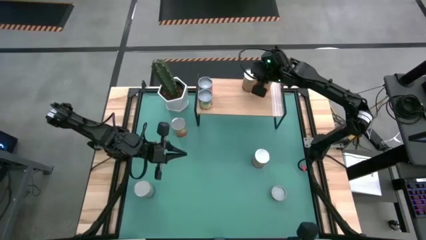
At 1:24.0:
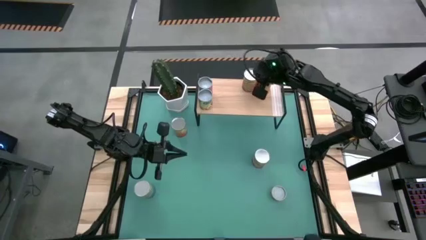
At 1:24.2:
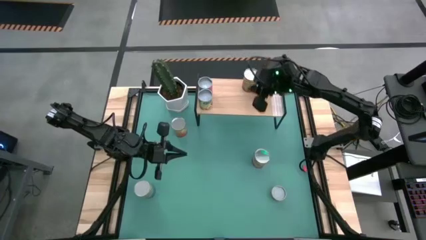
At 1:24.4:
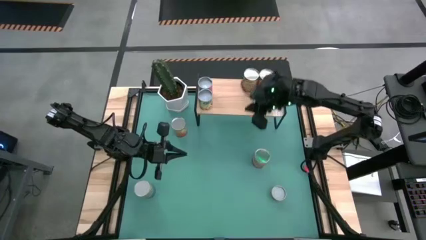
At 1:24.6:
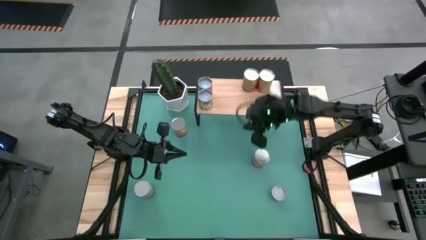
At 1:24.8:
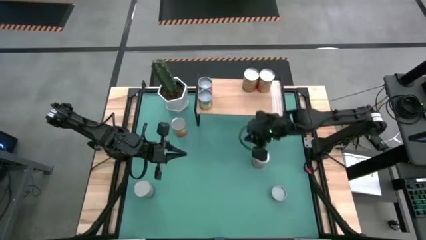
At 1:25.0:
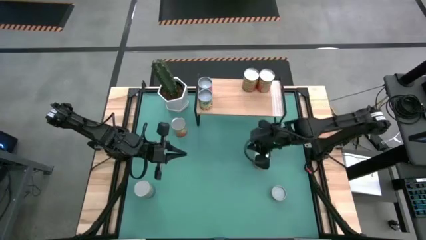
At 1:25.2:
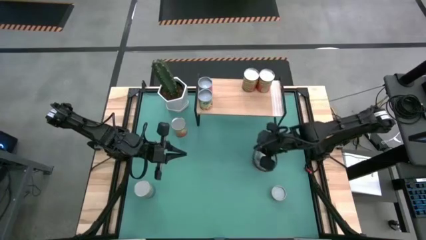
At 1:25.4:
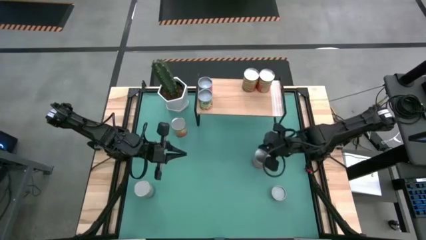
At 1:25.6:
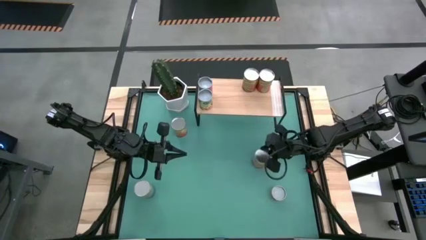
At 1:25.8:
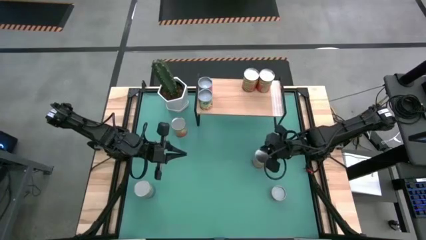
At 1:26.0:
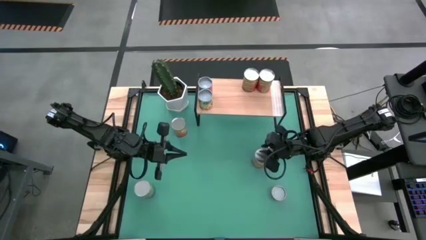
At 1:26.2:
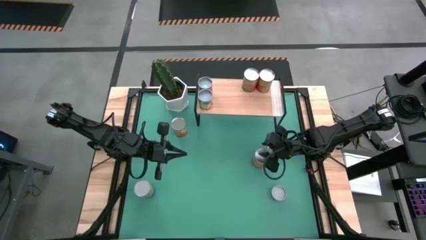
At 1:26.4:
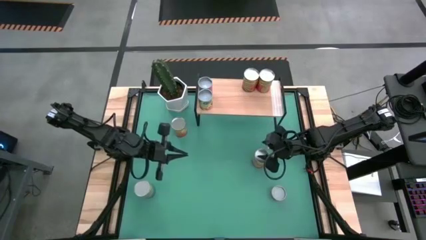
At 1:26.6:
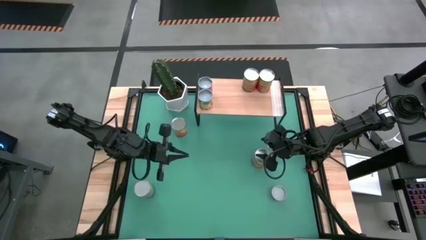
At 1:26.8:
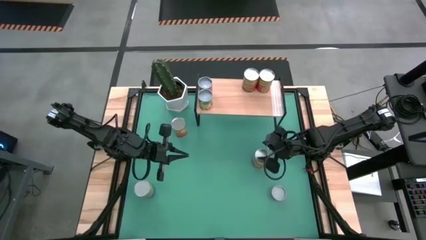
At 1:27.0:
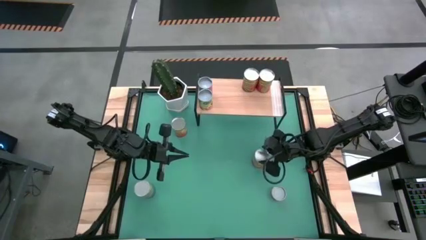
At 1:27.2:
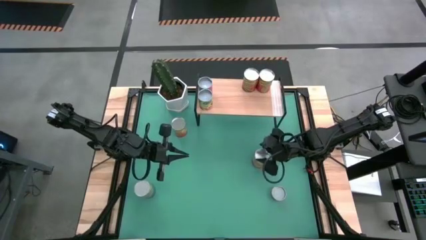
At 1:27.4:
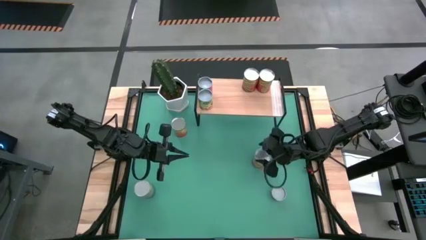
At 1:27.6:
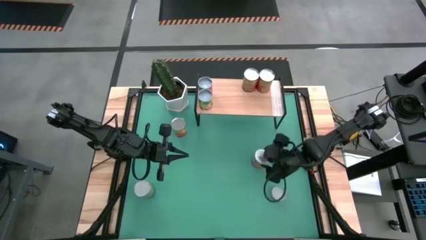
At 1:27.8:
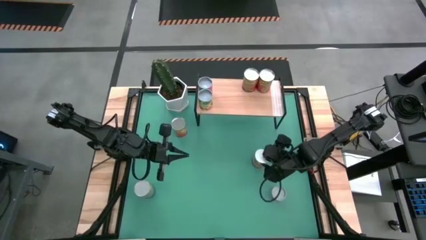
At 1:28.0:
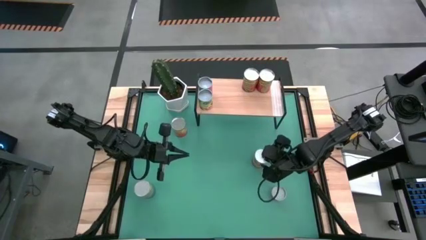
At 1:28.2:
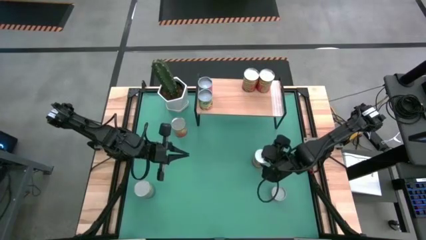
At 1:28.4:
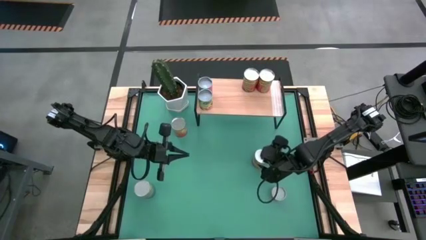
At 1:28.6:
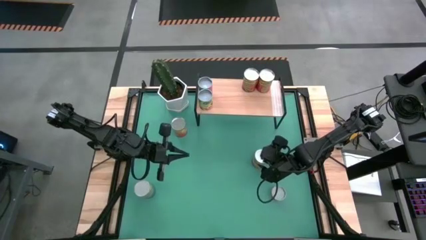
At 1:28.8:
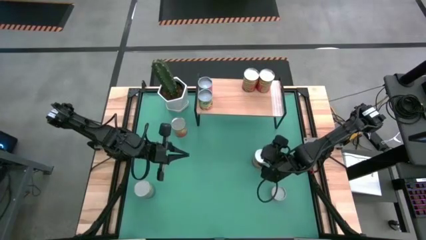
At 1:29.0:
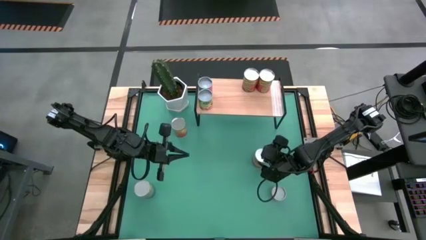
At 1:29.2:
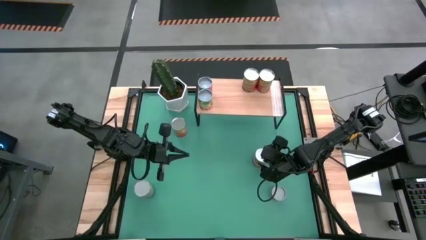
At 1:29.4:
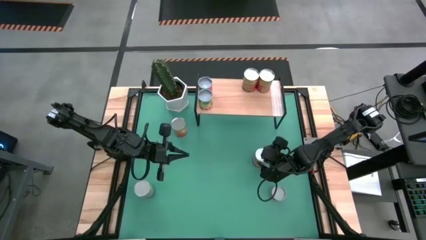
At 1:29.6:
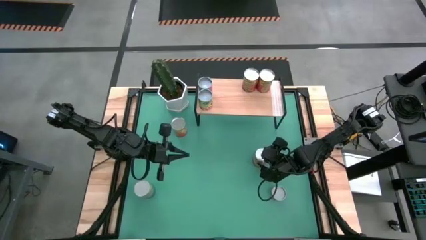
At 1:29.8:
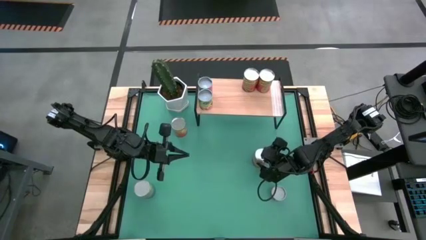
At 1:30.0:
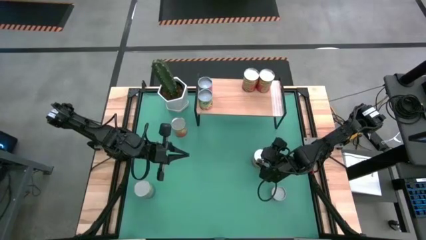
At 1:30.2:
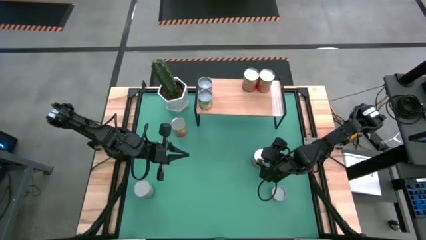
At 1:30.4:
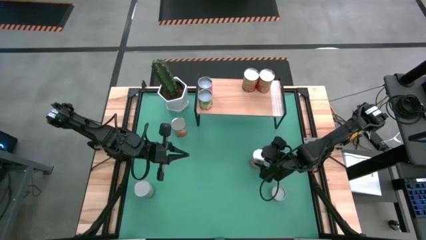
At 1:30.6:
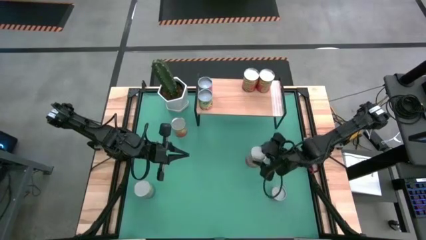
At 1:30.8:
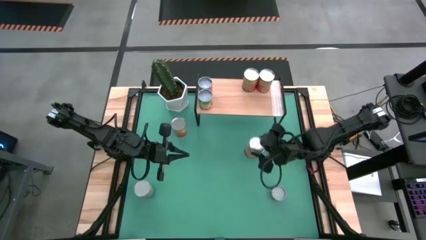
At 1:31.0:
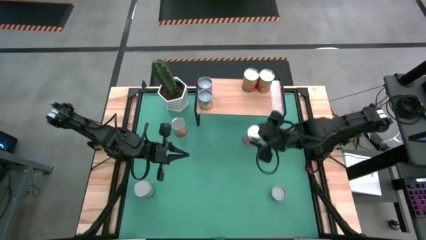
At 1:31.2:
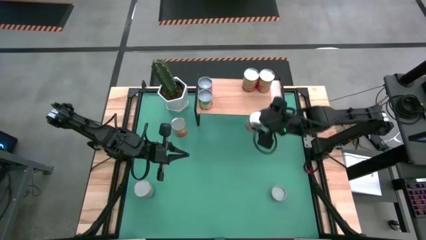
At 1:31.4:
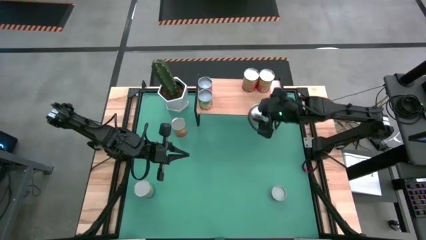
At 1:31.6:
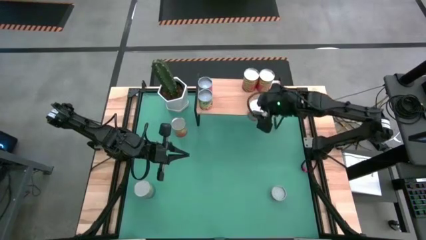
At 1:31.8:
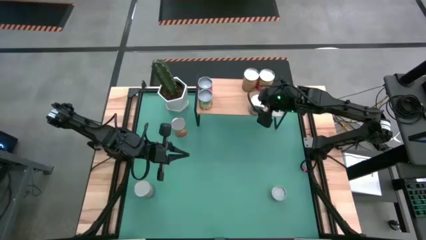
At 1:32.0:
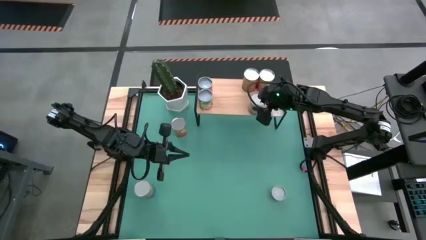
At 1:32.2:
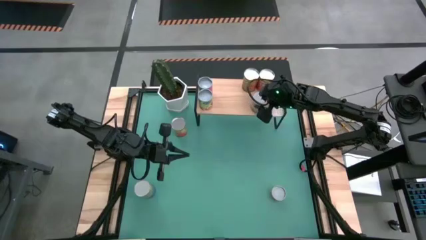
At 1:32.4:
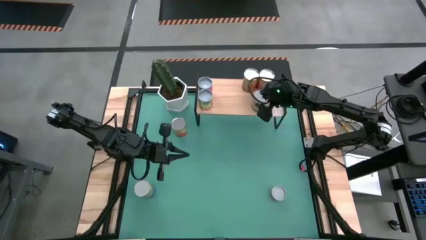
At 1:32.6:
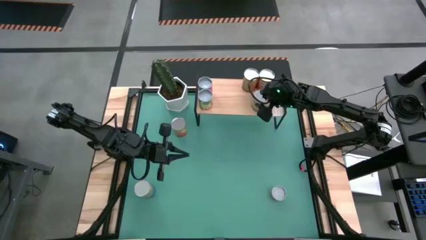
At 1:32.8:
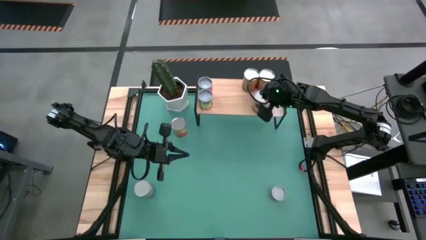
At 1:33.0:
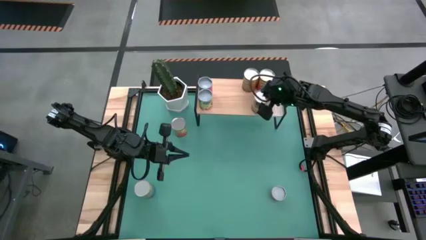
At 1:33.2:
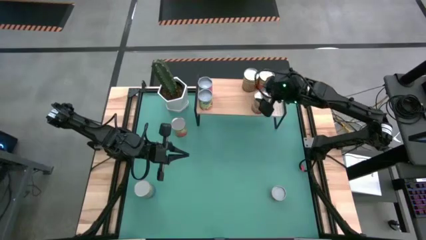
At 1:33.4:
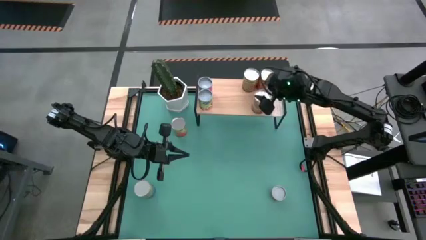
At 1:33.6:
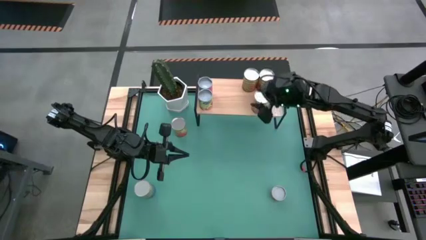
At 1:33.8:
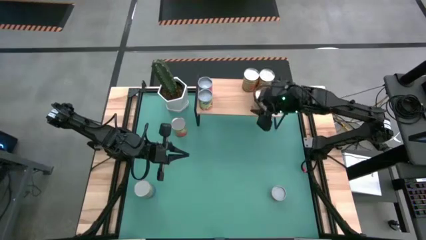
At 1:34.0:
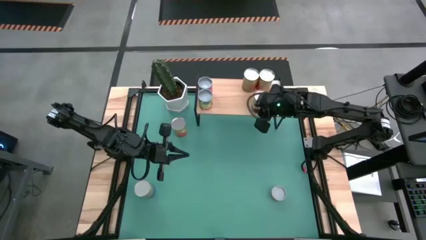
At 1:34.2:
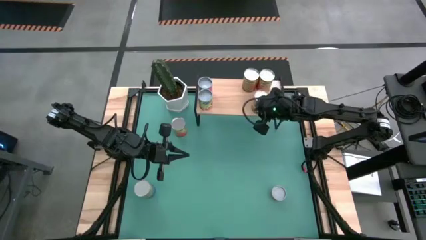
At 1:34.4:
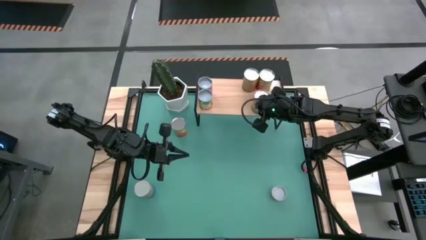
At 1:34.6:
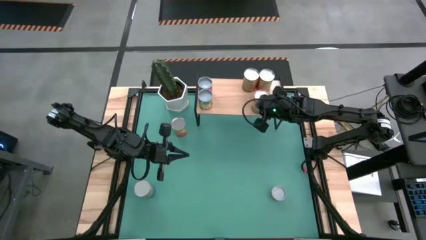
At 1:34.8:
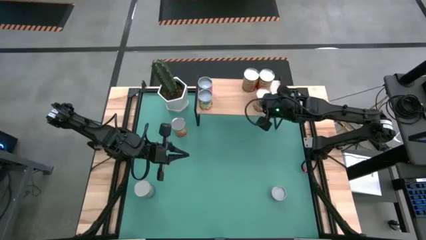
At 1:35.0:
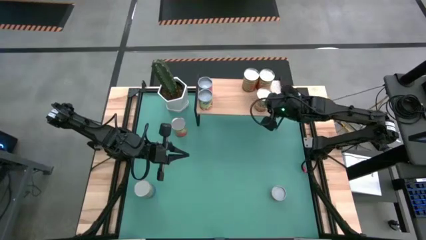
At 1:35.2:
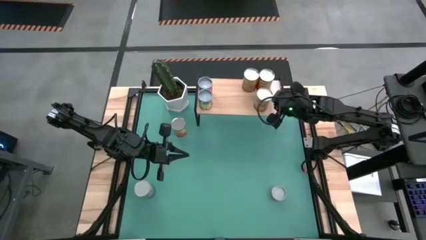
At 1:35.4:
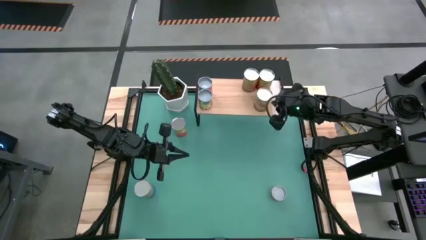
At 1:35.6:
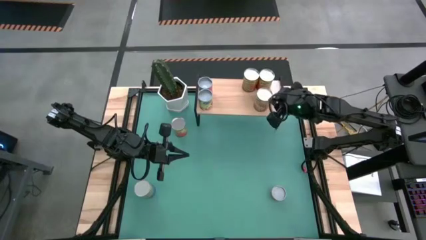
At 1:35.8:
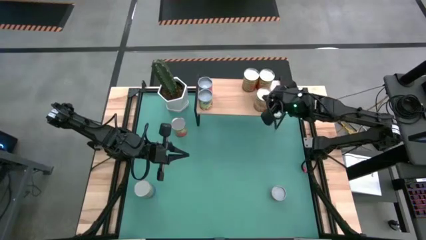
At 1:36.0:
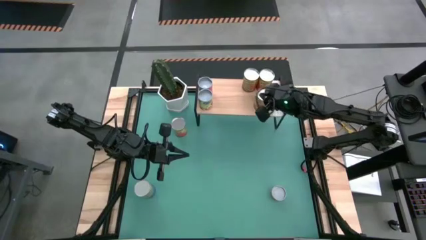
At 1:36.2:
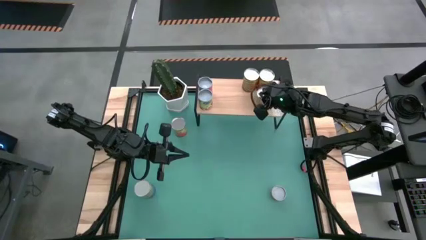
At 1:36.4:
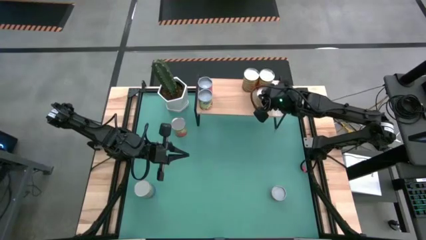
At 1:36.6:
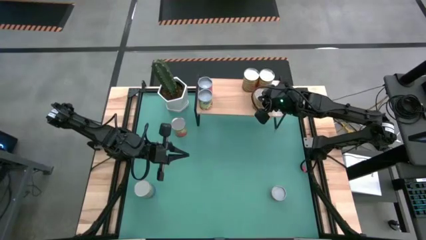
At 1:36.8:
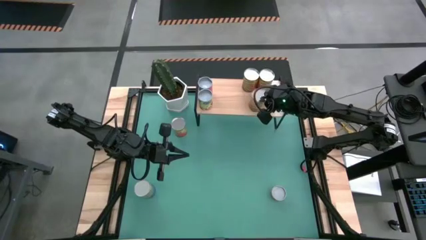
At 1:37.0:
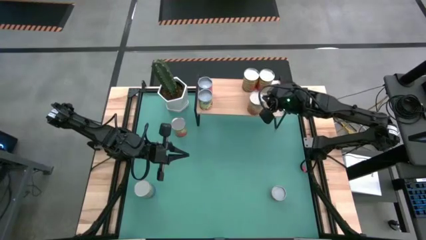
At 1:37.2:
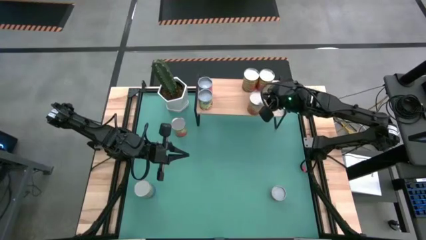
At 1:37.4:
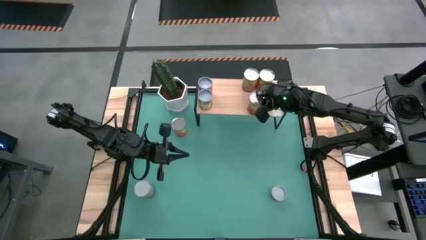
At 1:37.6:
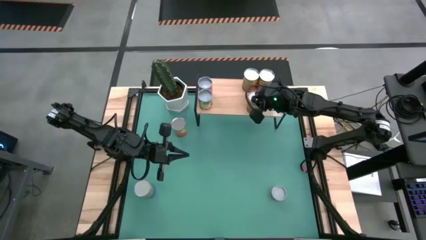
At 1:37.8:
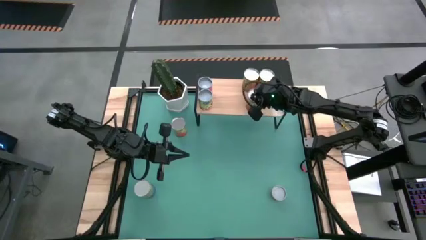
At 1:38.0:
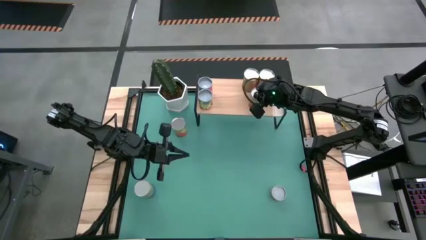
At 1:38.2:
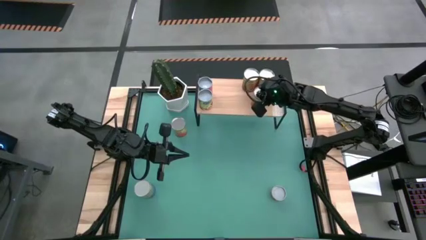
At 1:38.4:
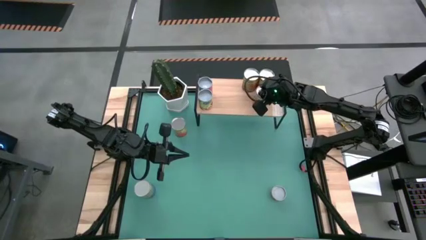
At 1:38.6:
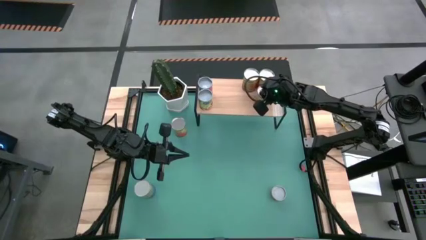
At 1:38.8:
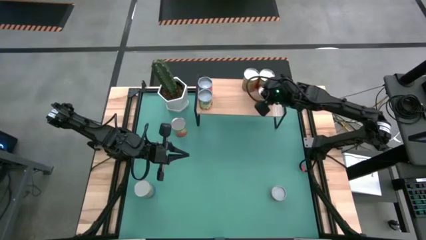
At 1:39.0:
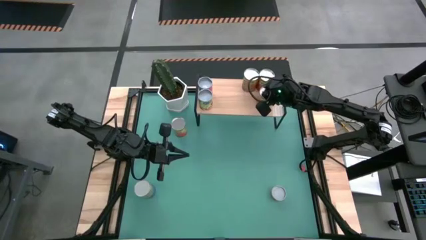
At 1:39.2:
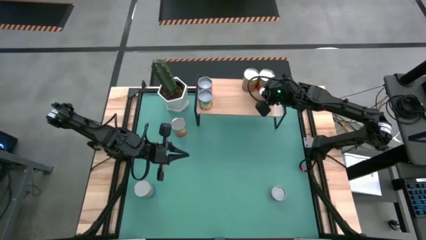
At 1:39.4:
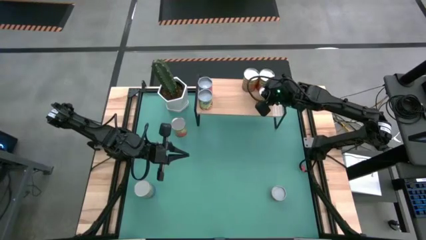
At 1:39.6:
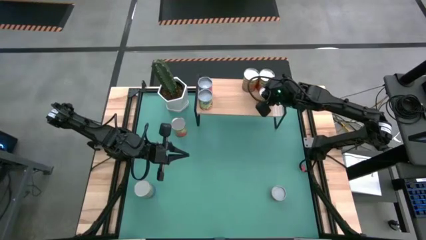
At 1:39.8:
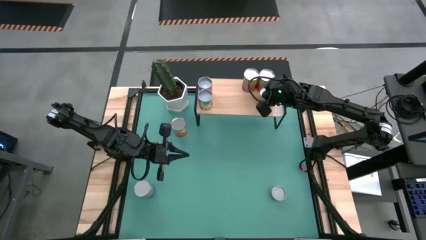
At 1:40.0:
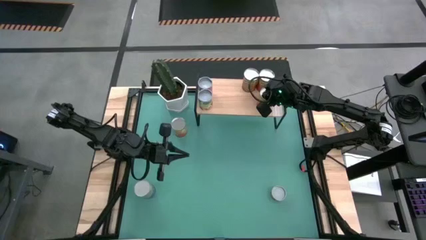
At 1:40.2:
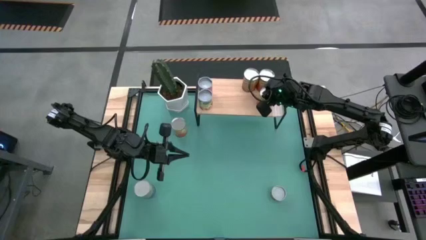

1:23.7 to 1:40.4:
Task: Pick and place cans onto a shelf
Put the canned corn on the shelf
